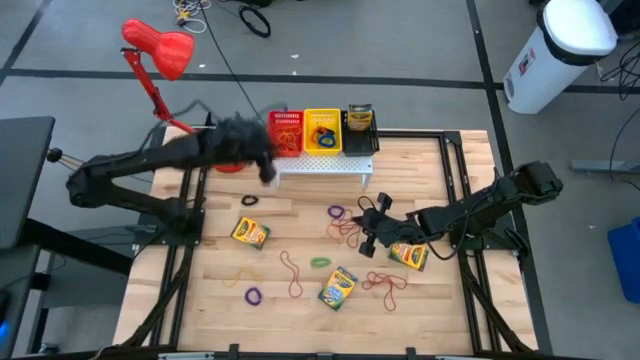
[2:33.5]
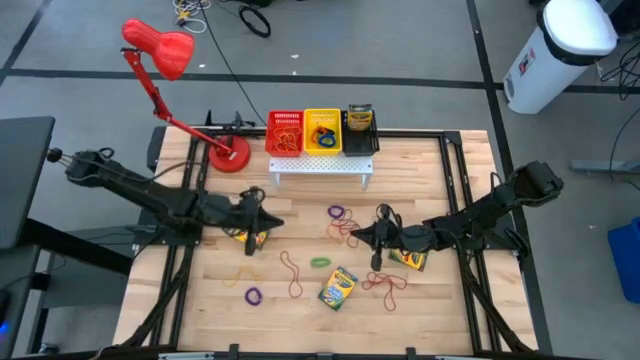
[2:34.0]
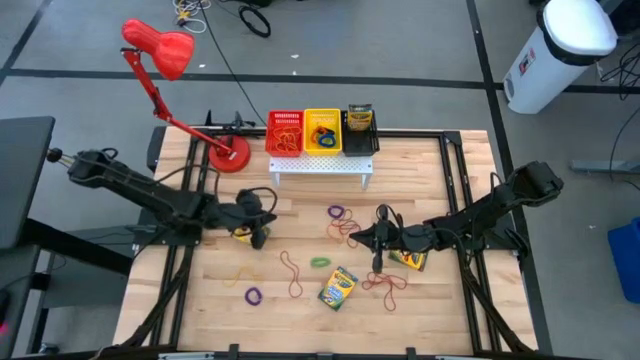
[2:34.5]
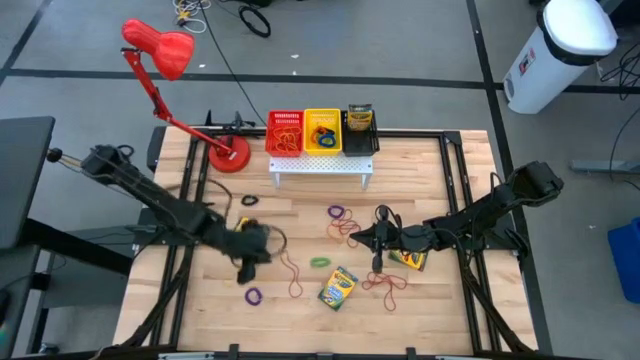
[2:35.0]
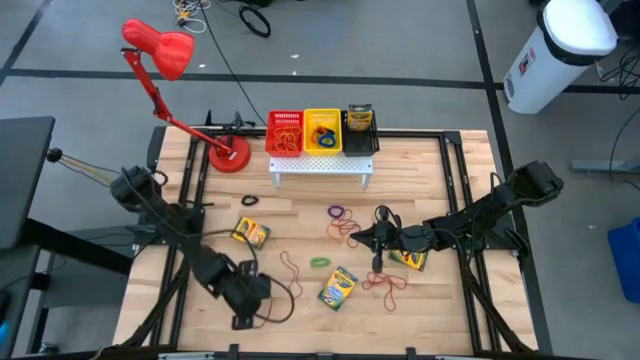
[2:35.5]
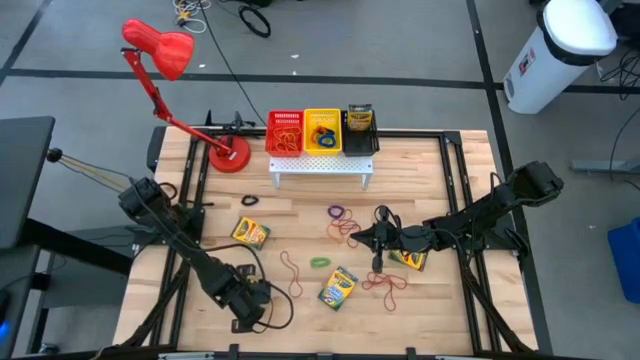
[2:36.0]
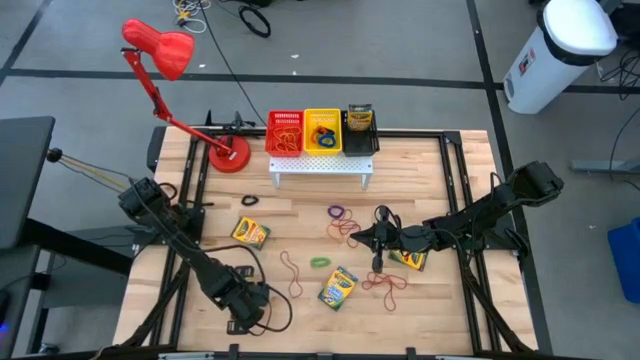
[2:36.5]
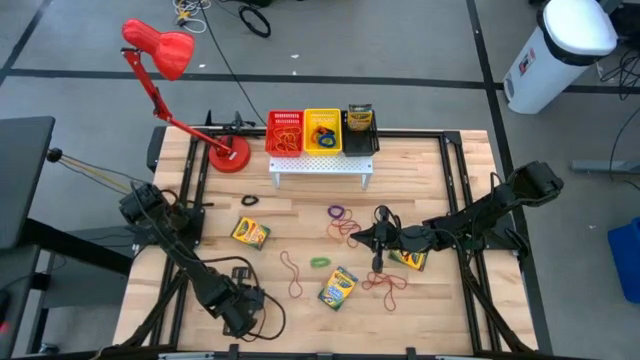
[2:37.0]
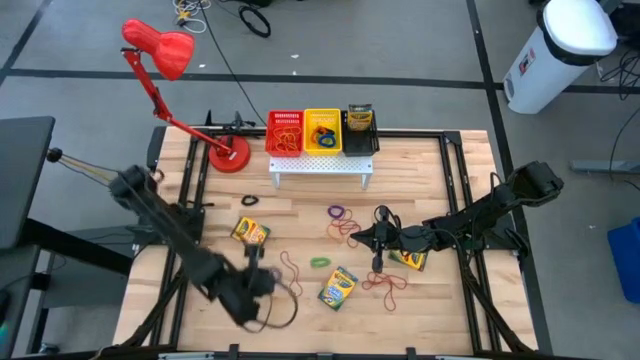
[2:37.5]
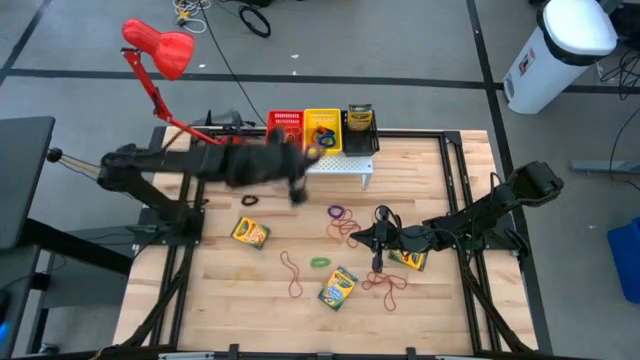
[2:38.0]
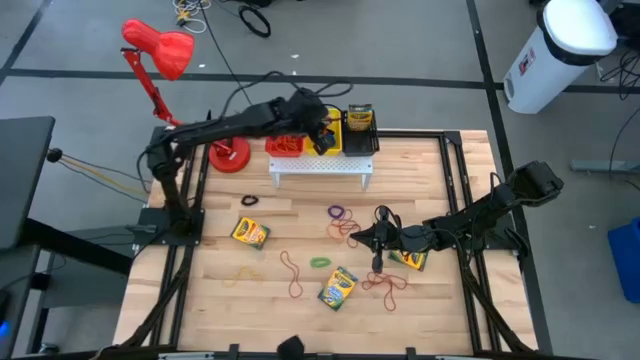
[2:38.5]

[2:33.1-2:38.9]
Task: Pick & Place Office Desk Supplies
Put the purple spring keychain into the yellow bin on the shelf

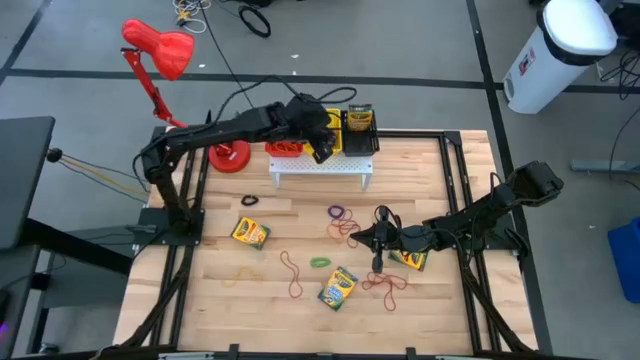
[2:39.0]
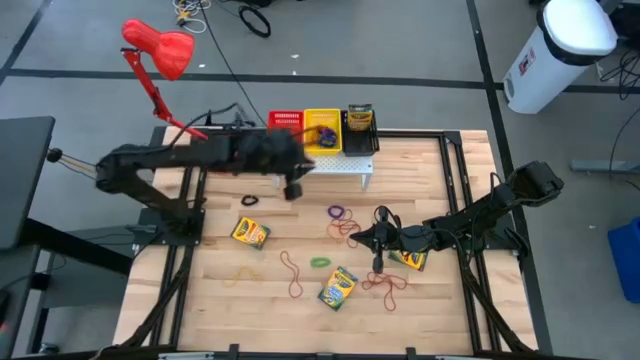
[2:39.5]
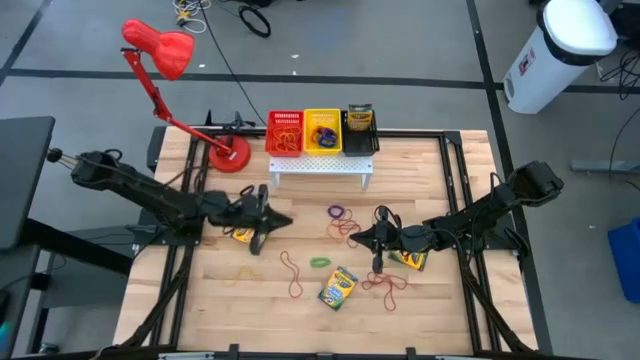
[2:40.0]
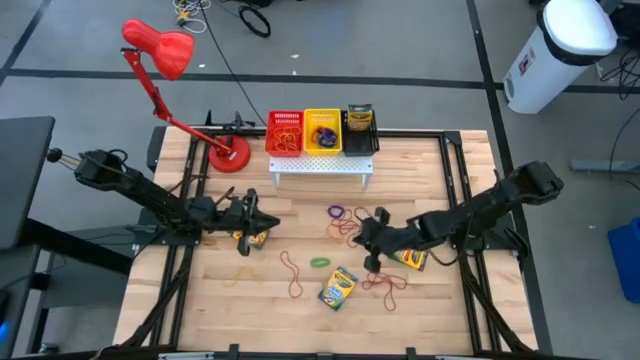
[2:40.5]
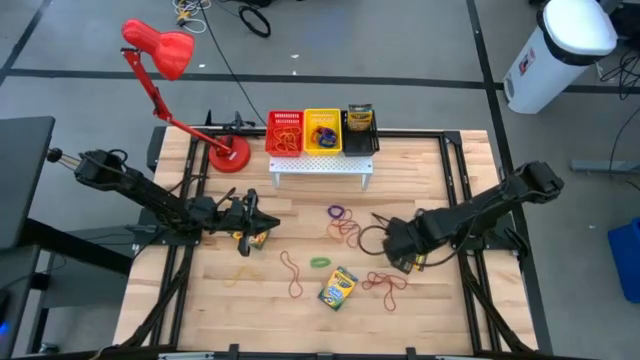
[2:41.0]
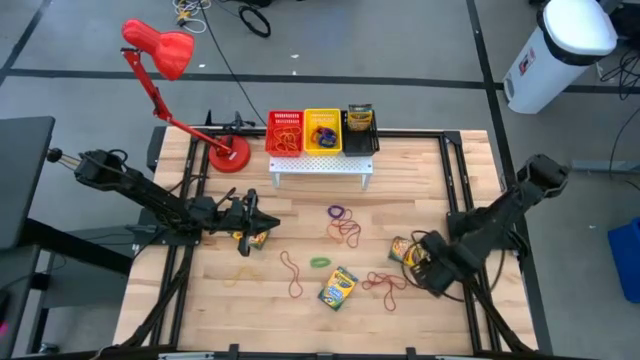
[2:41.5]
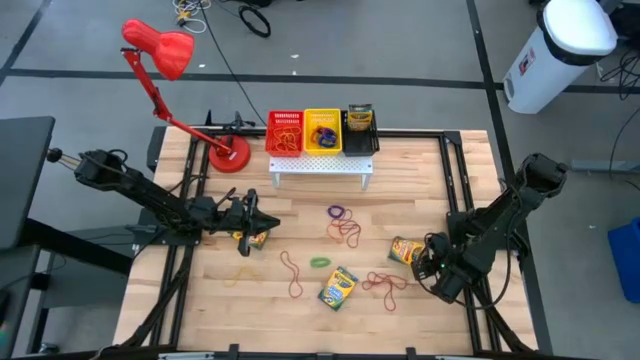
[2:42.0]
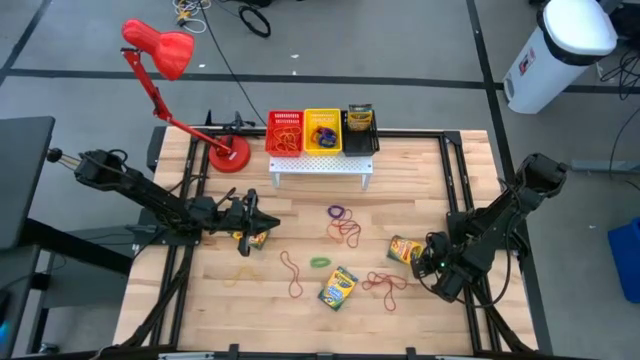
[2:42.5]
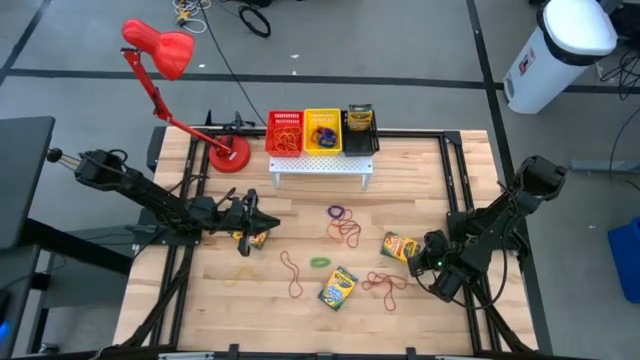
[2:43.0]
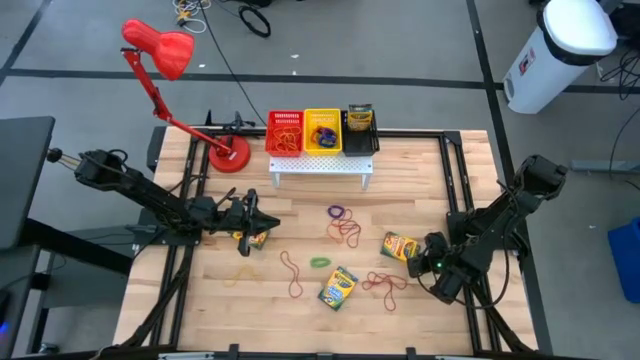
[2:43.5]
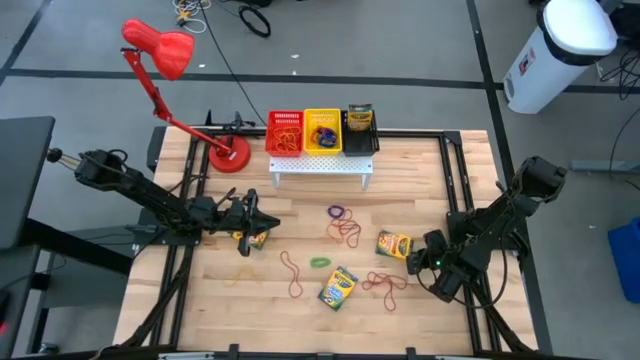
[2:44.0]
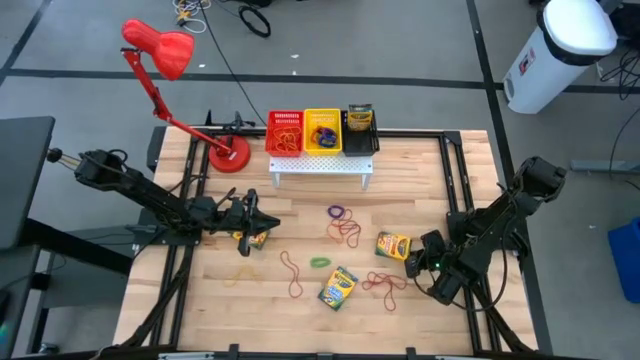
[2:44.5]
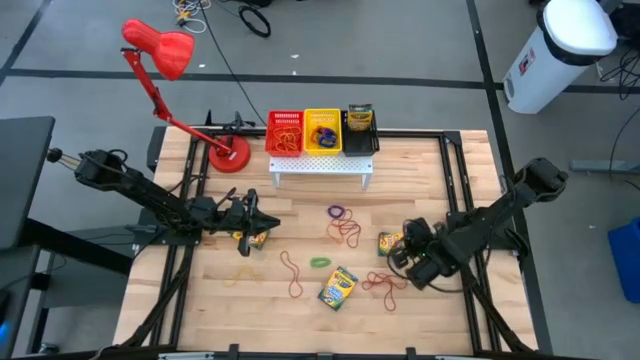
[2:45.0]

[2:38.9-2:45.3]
Put the yellow crayon box into the black bin on the shelf

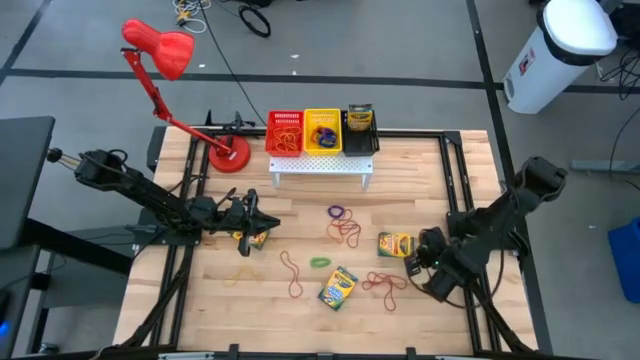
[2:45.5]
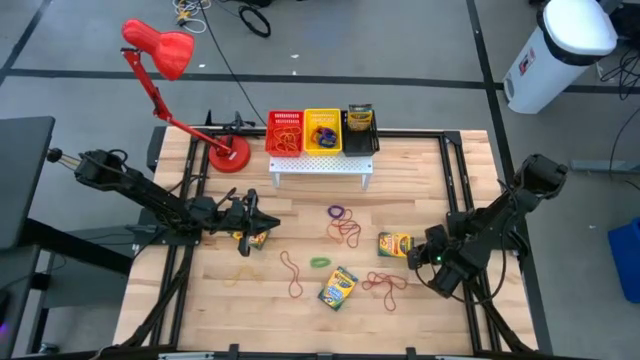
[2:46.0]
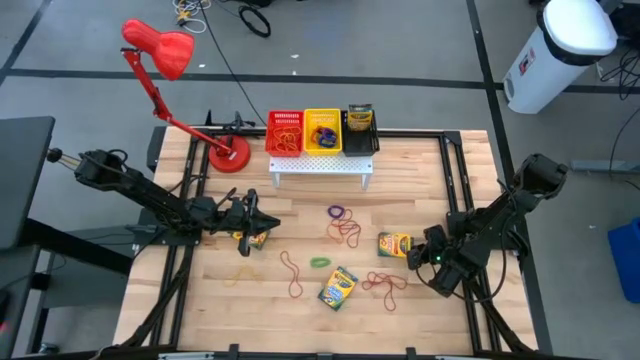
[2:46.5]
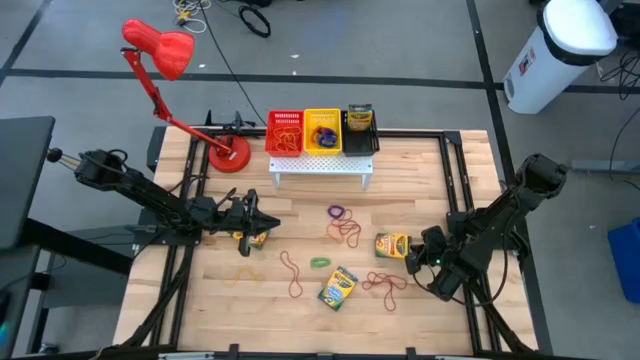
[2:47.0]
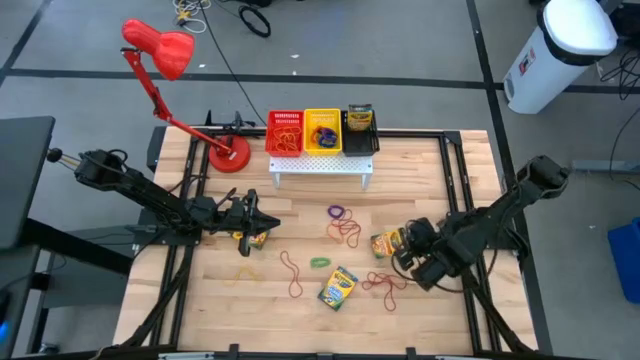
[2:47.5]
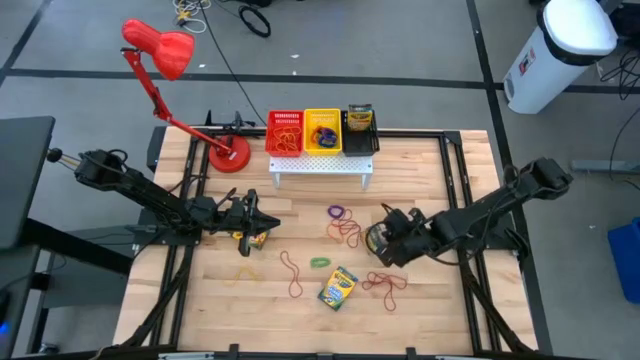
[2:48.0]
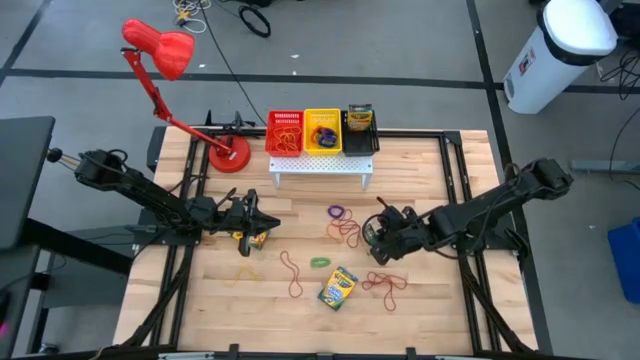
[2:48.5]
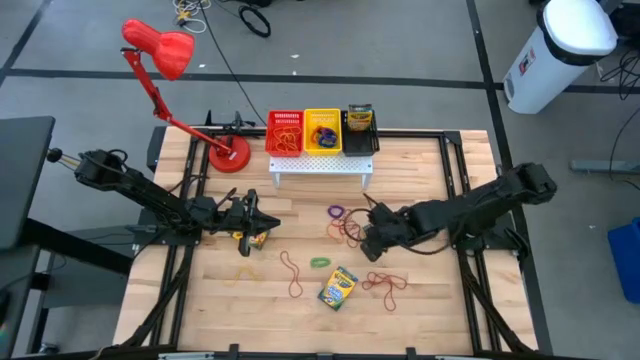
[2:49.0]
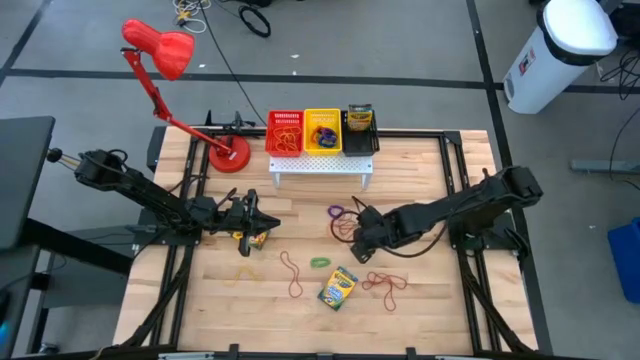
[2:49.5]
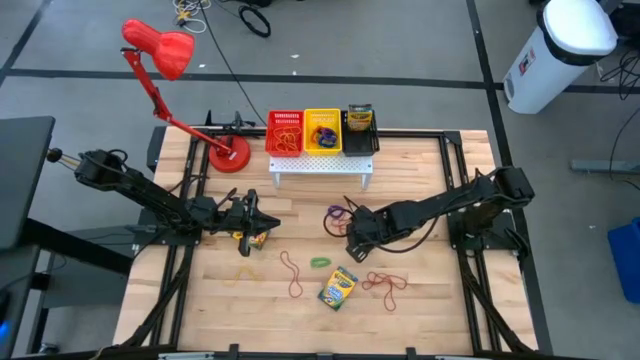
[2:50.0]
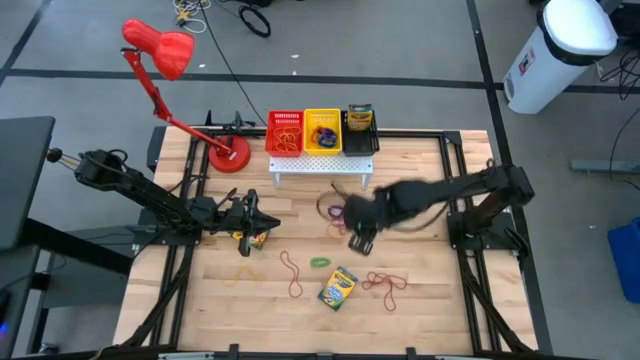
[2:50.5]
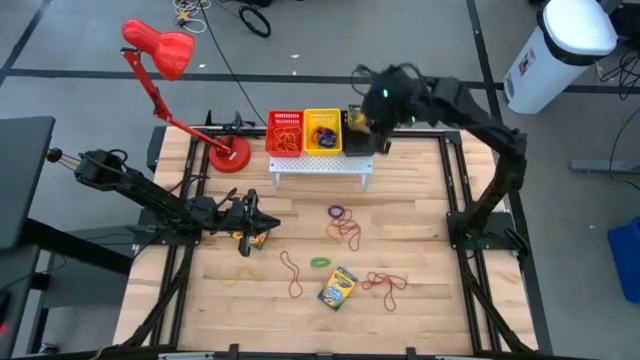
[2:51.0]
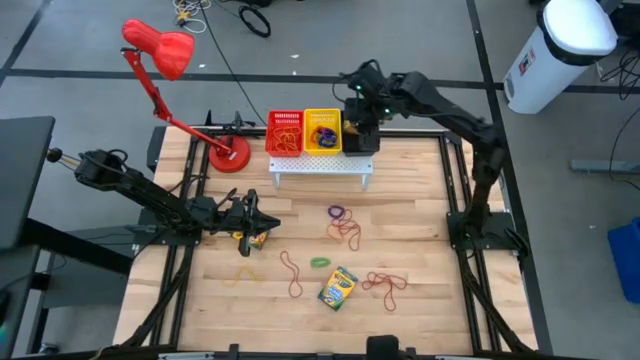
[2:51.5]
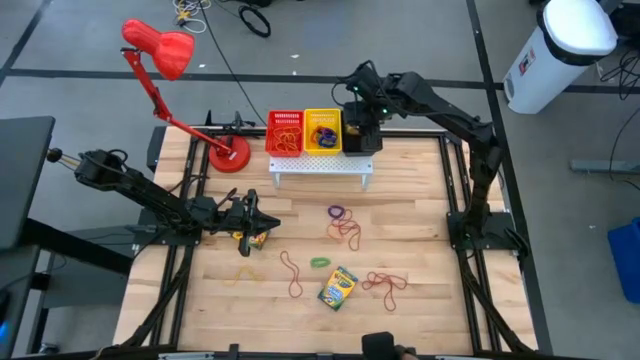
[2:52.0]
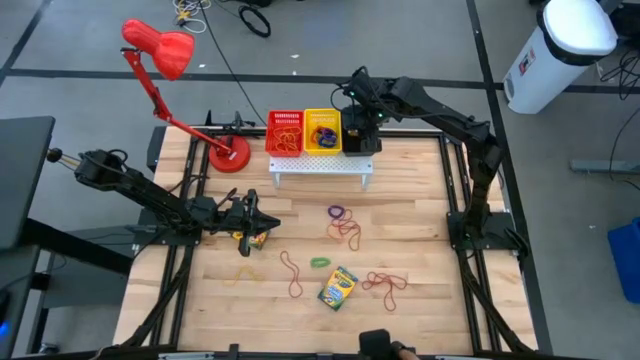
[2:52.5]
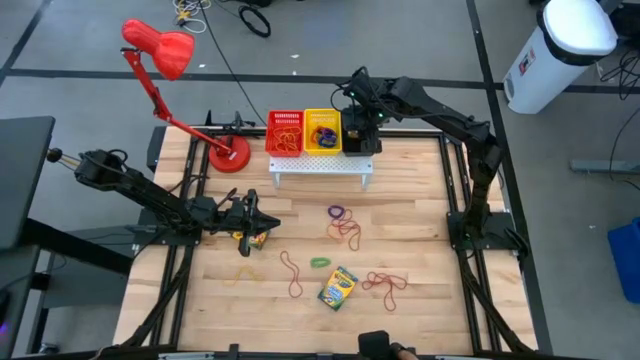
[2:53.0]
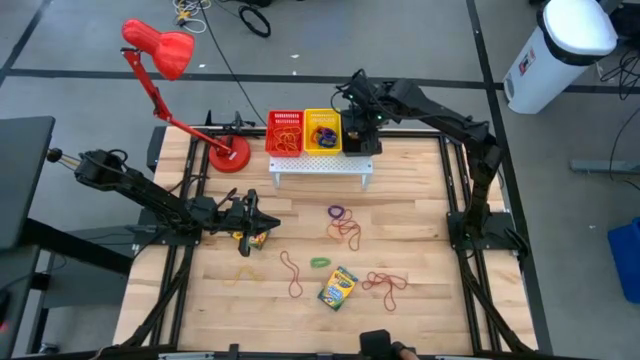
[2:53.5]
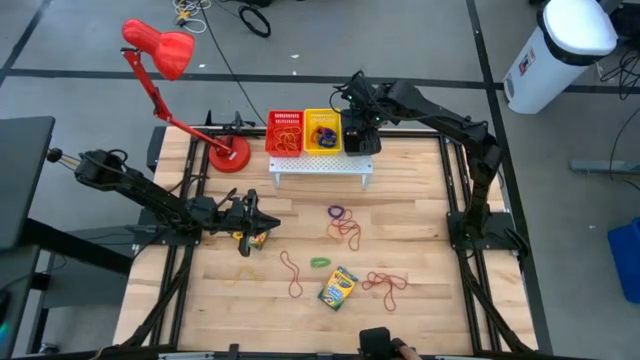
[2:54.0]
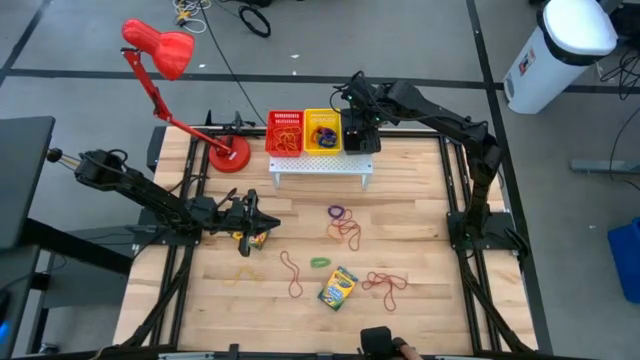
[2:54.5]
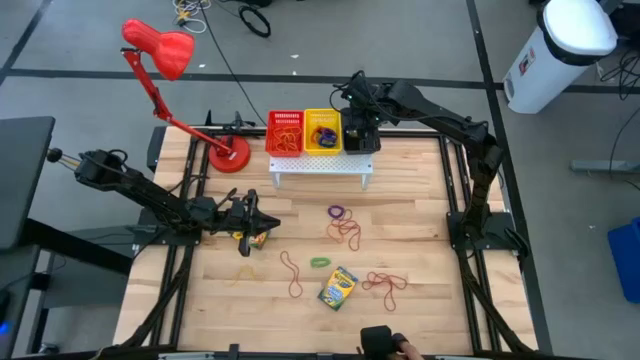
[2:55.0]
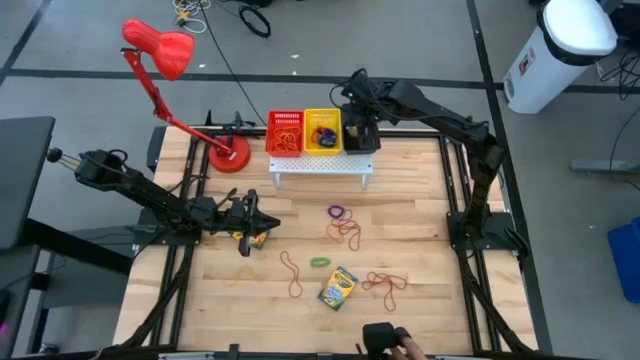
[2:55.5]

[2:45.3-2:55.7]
Put the yellow crayon box into the black bin on the shelf
